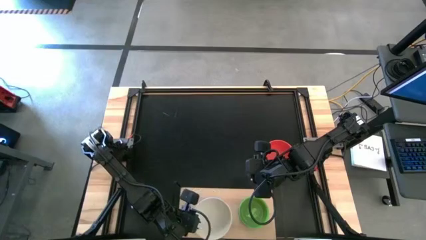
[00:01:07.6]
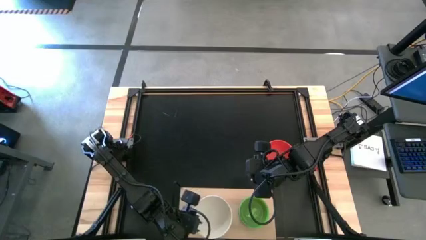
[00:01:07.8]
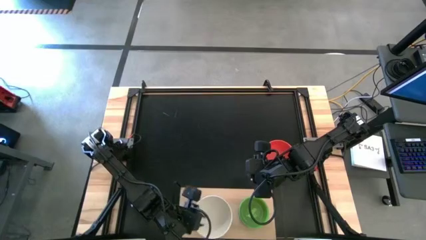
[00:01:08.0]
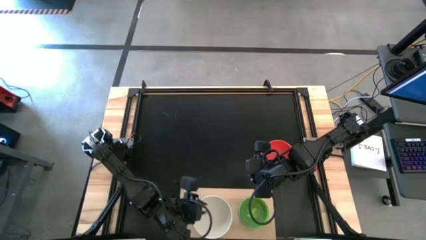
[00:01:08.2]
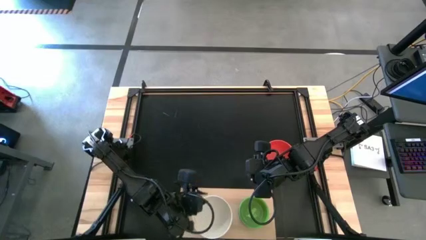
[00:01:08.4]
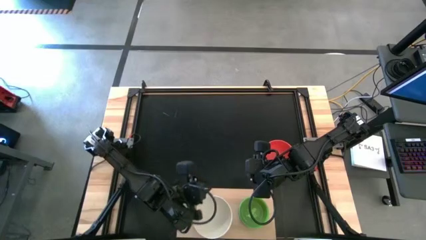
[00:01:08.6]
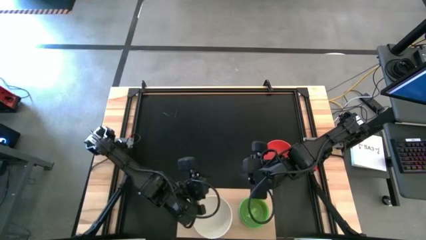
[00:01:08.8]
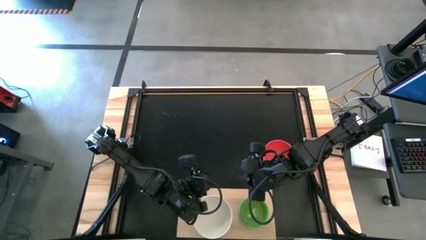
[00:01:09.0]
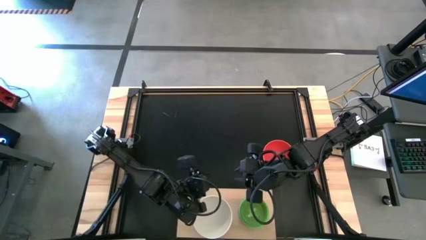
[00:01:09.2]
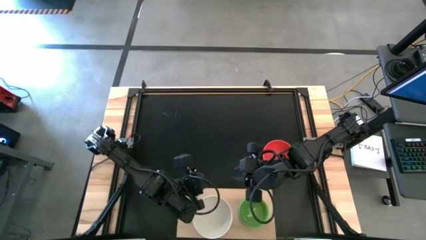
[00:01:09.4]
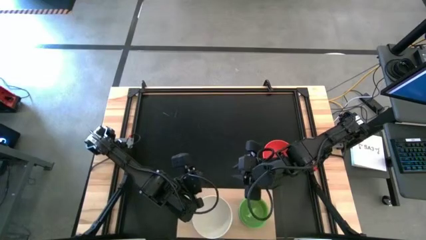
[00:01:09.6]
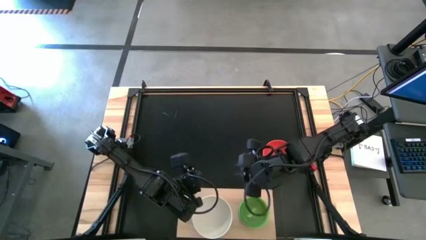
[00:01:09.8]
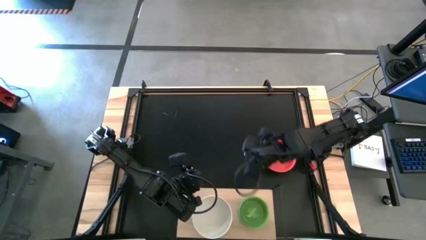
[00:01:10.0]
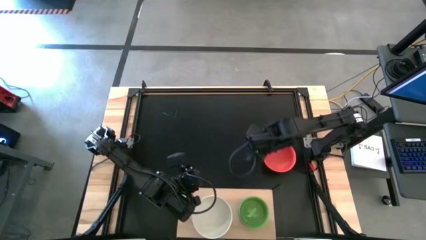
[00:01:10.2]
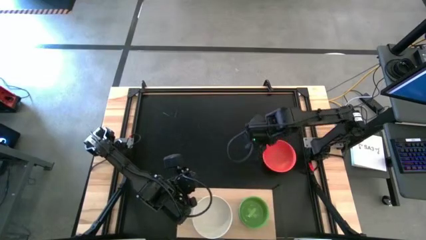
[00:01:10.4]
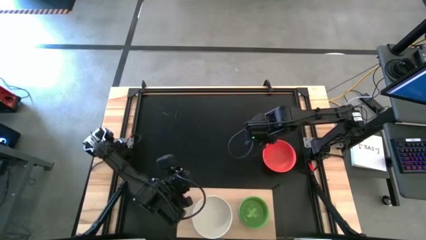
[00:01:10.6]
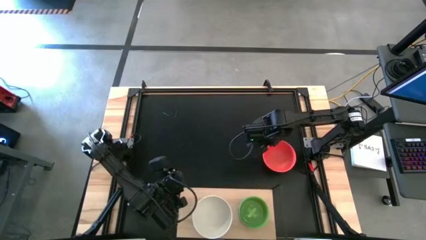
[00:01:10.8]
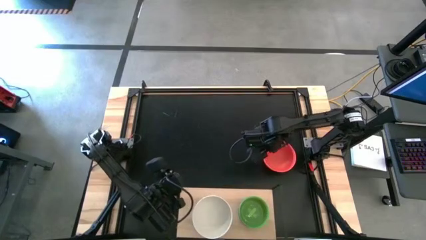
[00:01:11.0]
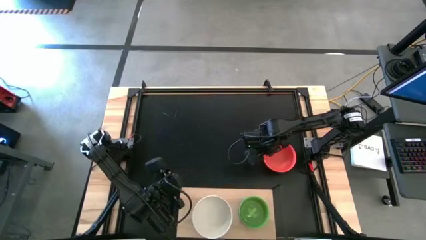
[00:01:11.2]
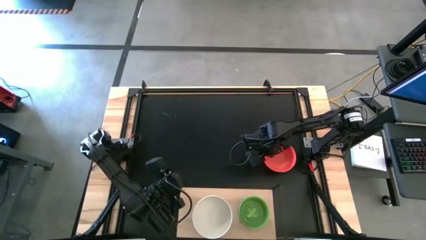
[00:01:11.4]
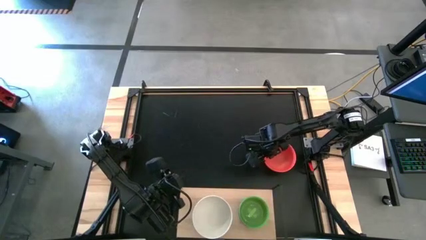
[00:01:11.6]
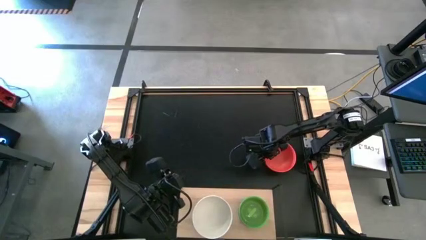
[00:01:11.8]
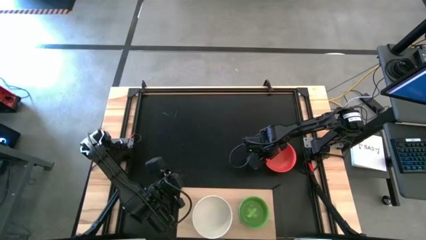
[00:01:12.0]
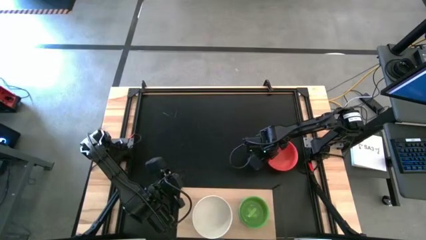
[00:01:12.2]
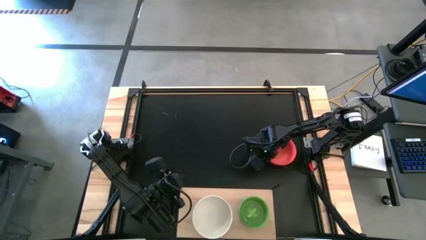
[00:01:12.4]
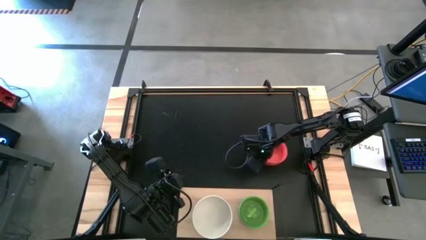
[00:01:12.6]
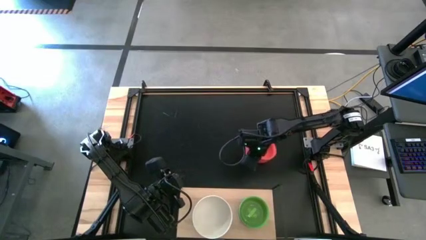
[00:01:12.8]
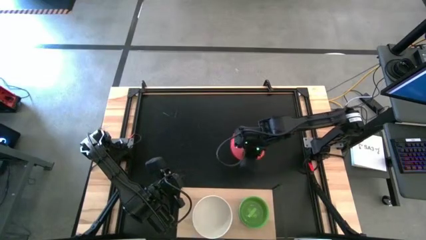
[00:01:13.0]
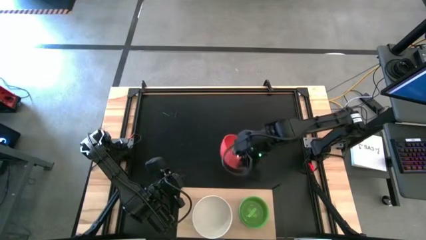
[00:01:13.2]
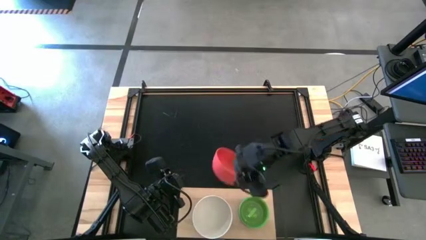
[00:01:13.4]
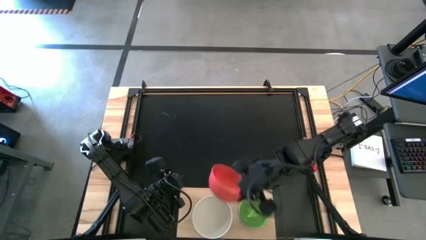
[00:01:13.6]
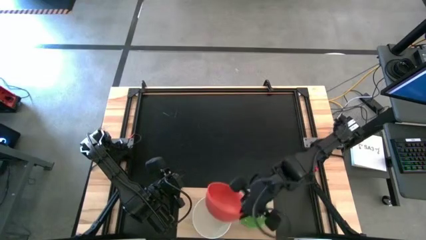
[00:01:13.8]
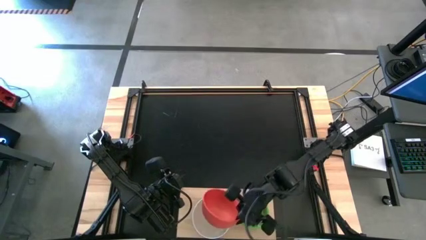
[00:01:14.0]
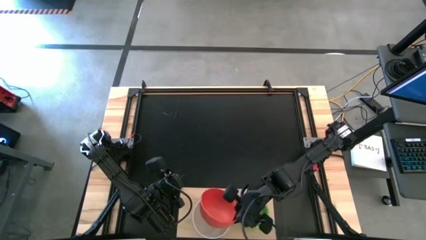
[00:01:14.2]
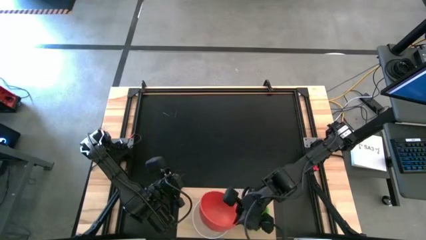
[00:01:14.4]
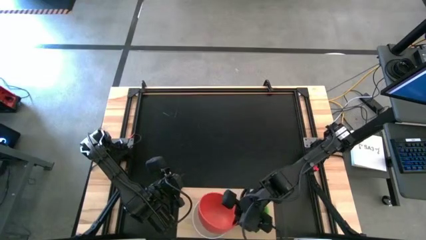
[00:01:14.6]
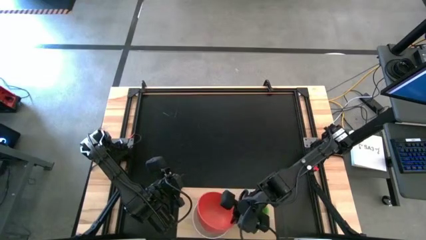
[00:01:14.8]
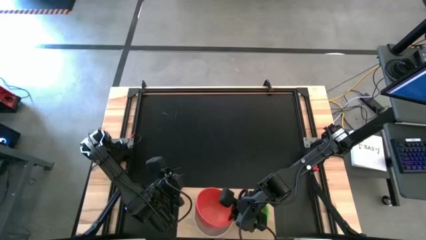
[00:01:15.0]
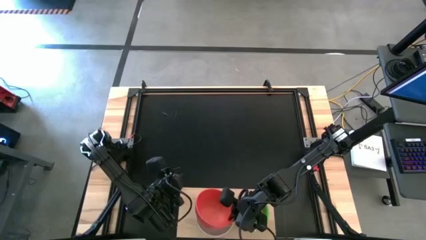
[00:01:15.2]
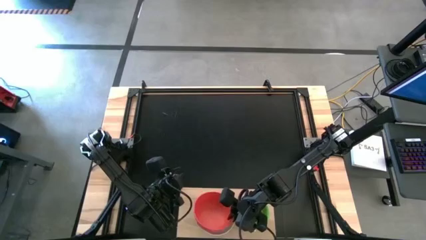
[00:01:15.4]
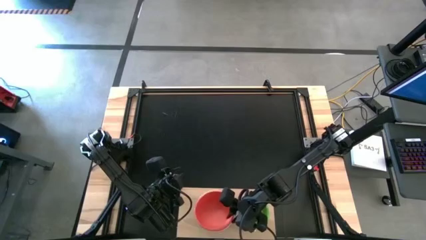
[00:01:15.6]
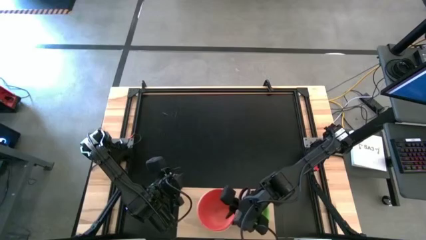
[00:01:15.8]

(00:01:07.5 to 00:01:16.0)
Task: Place and stack bowls onto a shelf
Stack the big orange bowl on top of the big white bowl on the shelf

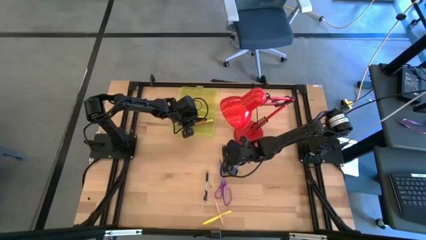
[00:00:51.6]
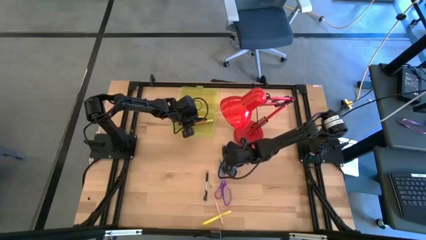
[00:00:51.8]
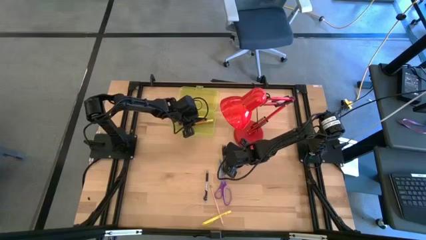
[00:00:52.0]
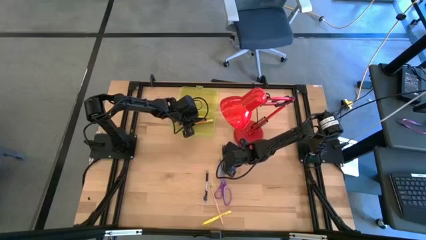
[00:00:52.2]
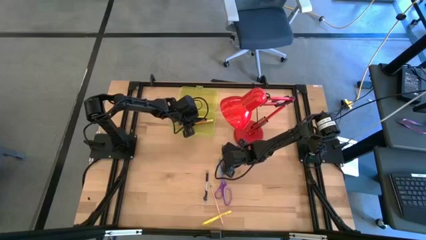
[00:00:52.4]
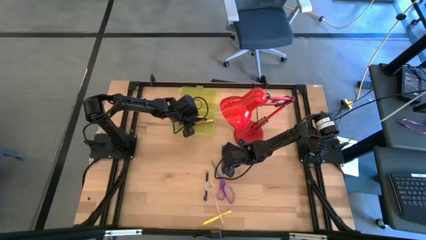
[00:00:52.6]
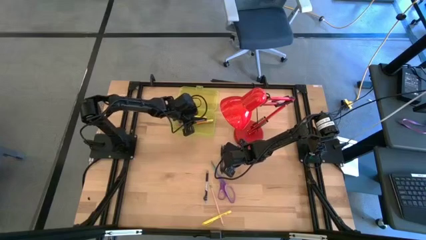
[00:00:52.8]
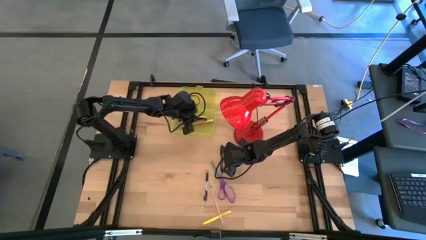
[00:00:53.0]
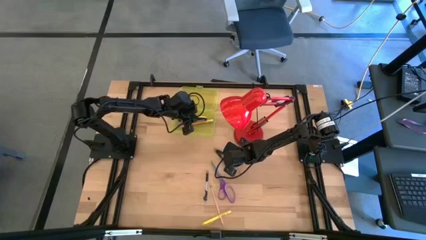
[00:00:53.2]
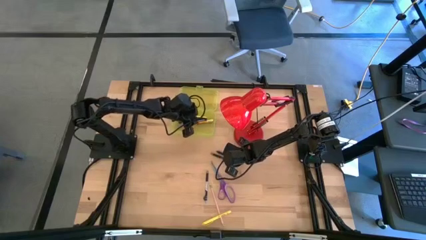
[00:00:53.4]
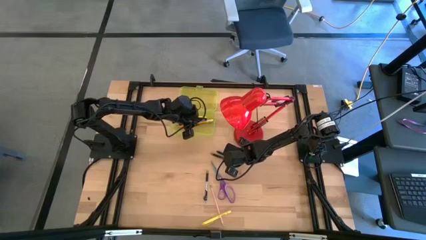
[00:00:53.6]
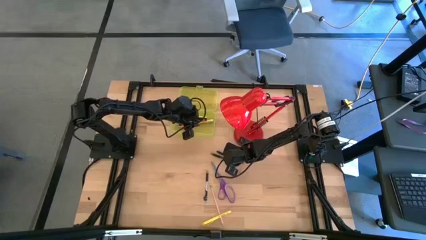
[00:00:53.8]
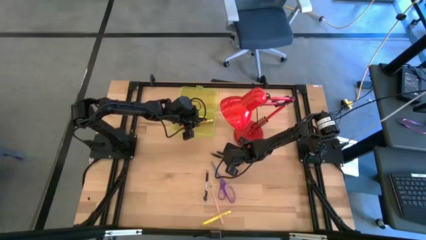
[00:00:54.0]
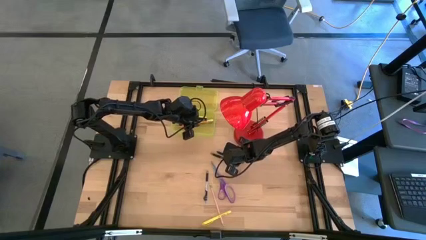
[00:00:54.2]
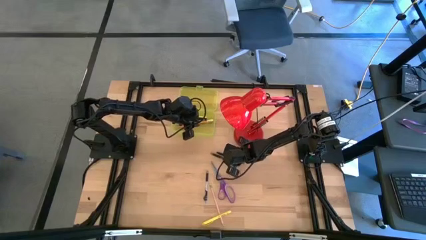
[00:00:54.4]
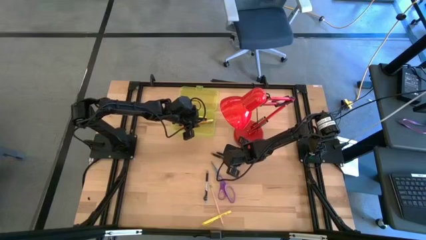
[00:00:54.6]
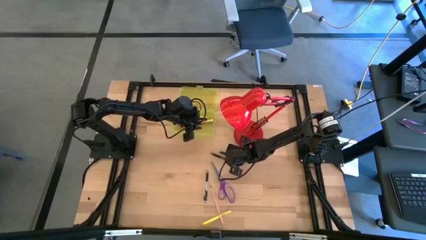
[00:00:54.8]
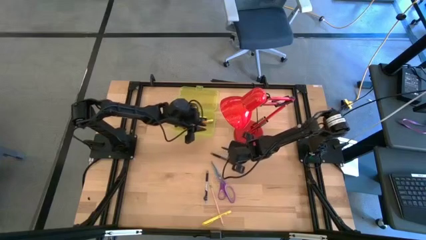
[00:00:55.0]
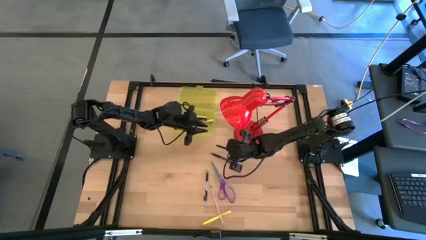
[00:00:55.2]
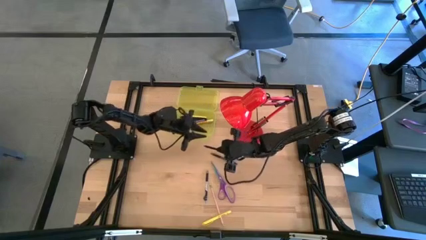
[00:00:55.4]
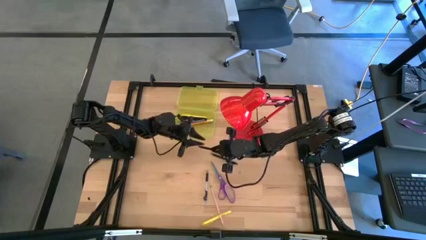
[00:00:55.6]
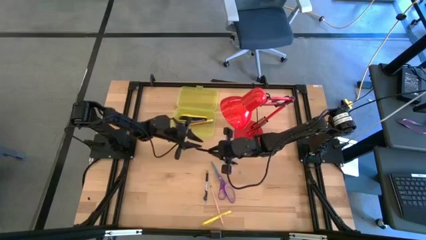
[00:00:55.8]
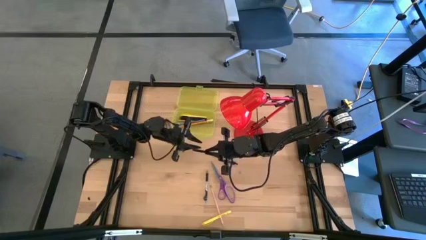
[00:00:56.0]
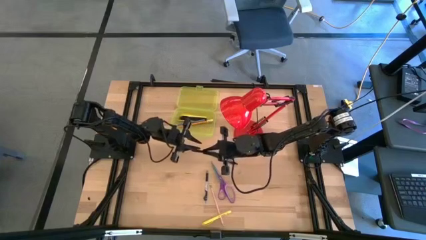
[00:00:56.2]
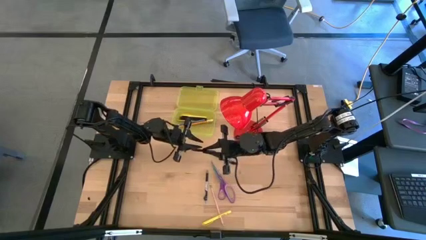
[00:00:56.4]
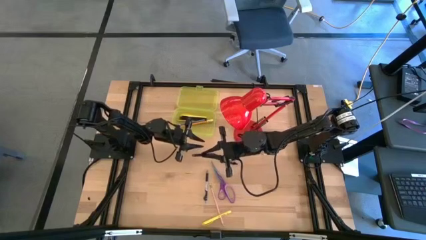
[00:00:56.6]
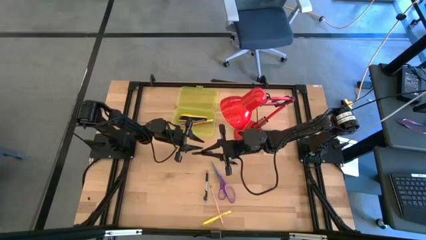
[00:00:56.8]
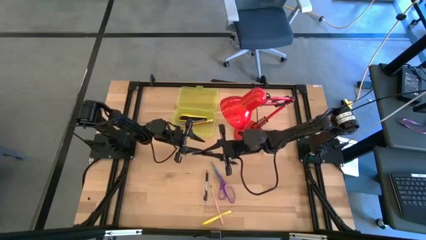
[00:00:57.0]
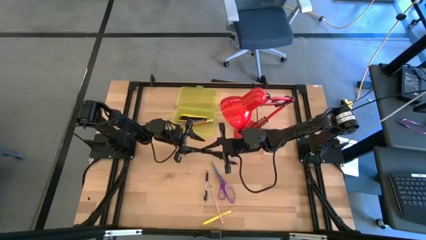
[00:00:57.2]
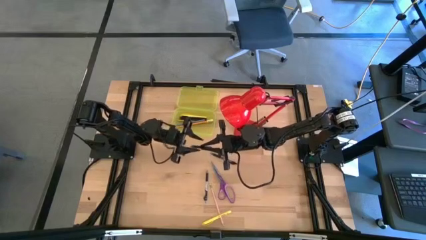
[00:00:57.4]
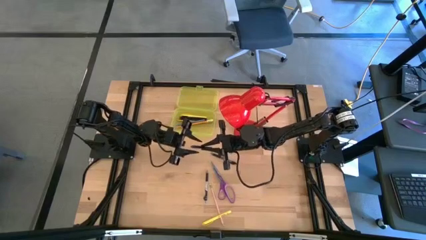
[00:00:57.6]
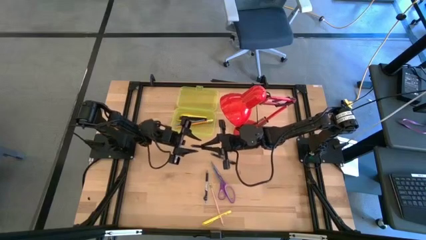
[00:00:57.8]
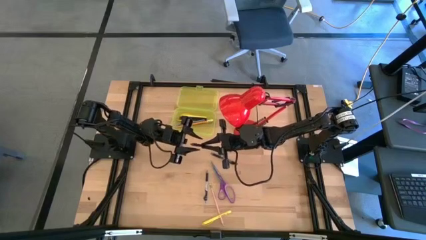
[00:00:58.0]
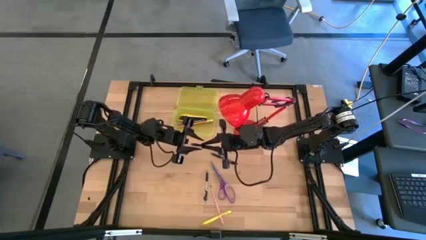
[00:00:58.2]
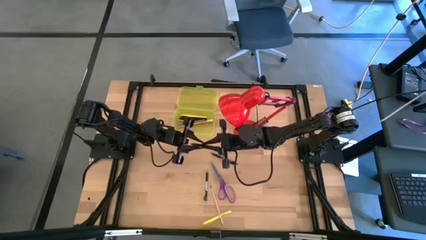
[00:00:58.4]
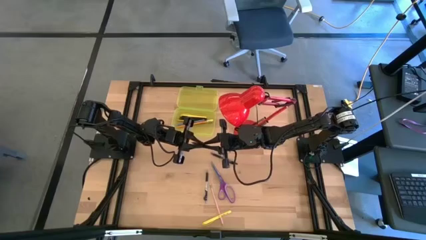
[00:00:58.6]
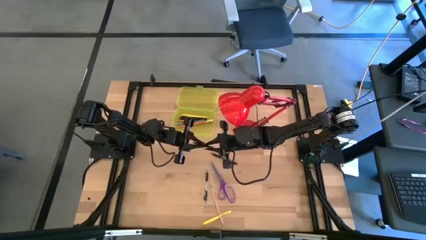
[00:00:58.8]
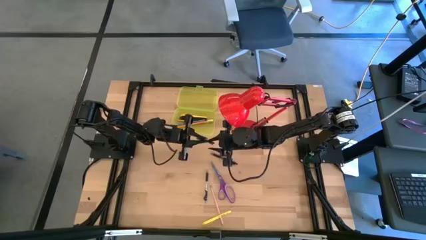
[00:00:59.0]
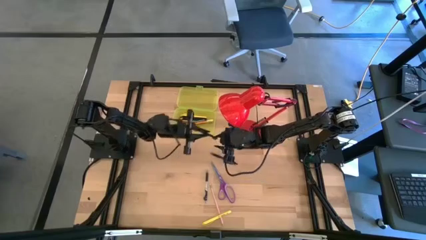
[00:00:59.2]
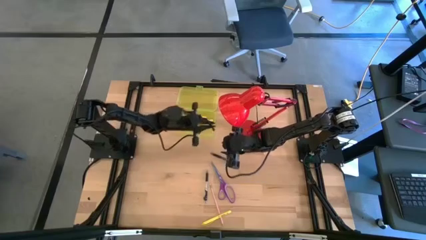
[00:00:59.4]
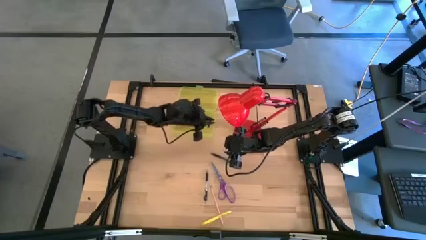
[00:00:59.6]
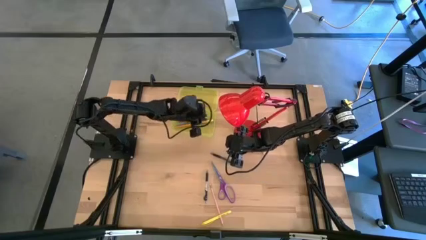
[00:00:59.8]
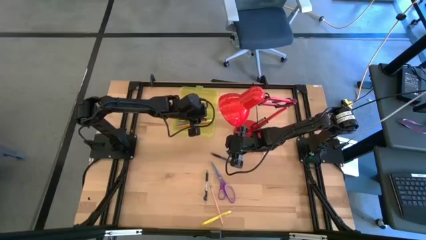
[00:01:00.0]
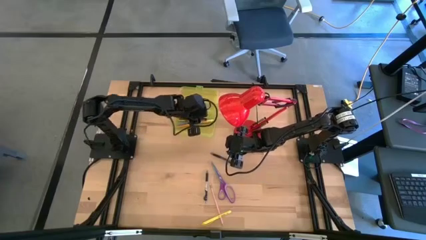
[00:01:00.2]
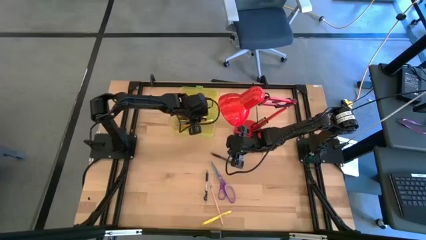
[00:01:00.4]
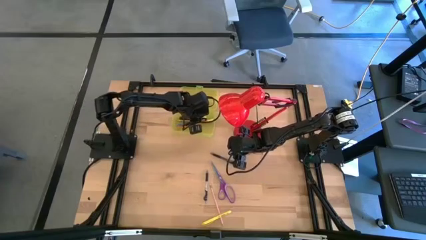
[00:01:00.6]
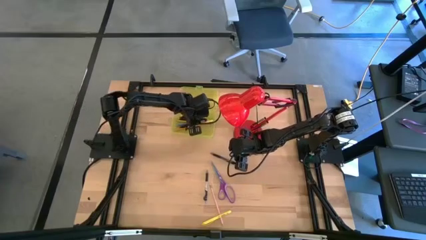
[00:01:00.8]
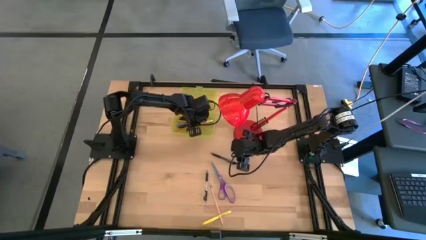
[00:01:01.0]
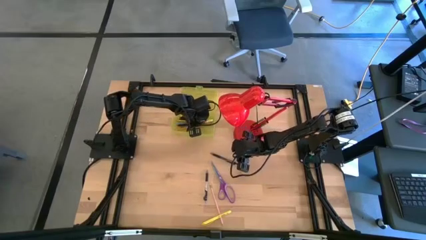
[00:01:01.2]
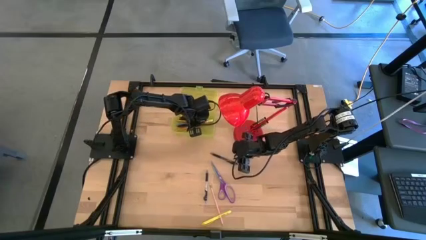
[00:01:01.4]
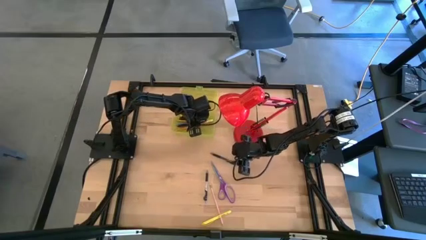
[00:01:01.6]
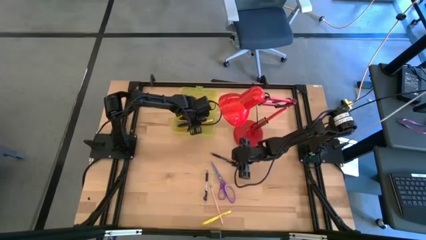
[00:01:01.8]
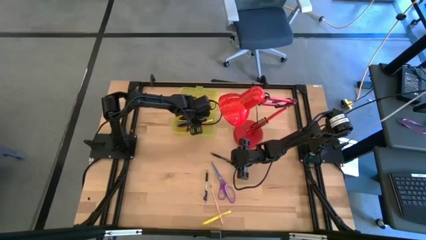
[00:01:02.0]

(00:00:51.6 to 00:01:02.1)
Task: Pick & place school supplies into a supply box
Put the black pen into the yellow supply box
